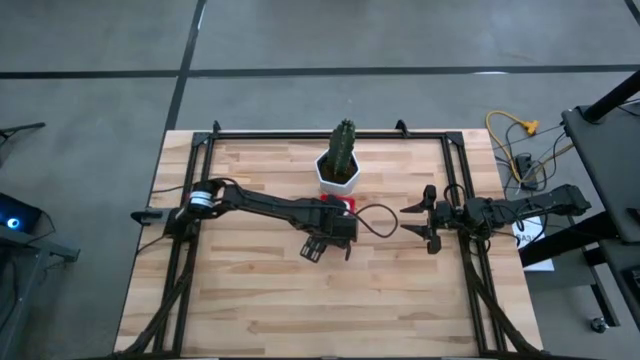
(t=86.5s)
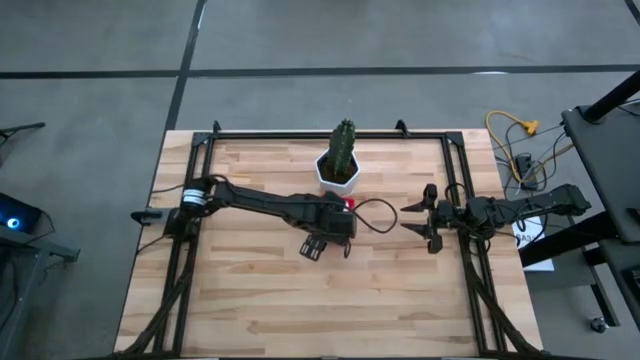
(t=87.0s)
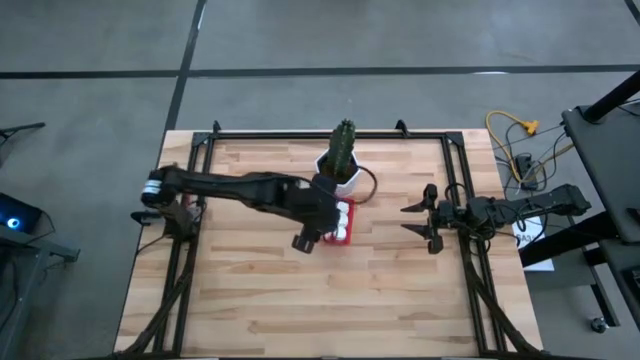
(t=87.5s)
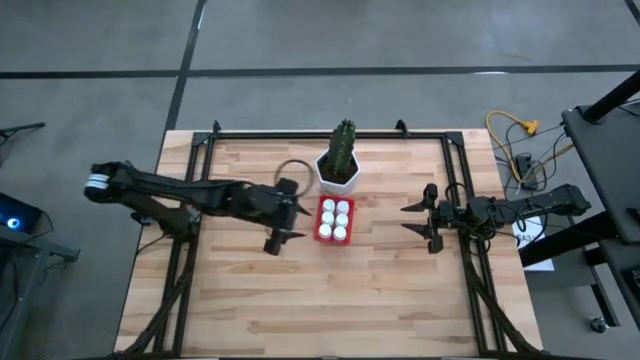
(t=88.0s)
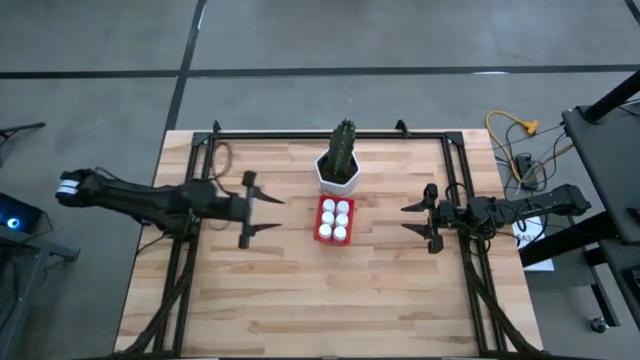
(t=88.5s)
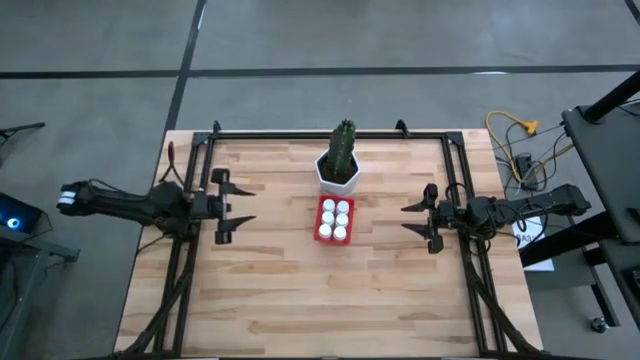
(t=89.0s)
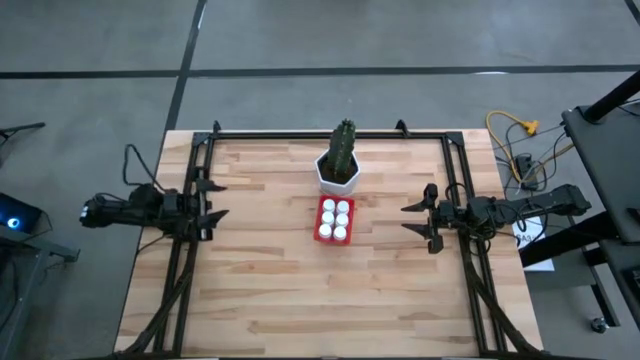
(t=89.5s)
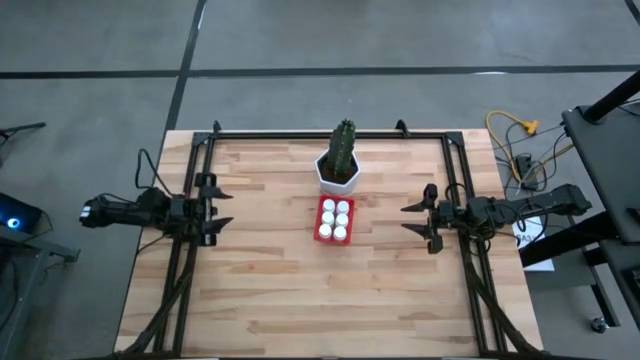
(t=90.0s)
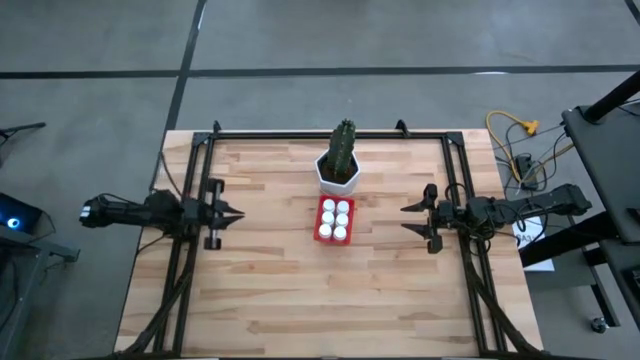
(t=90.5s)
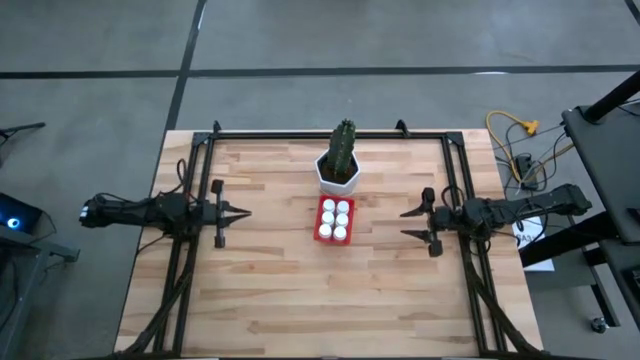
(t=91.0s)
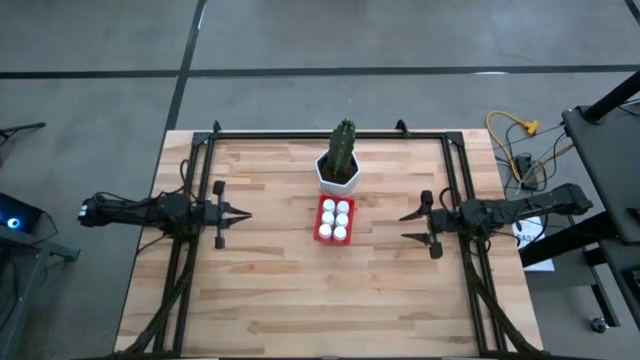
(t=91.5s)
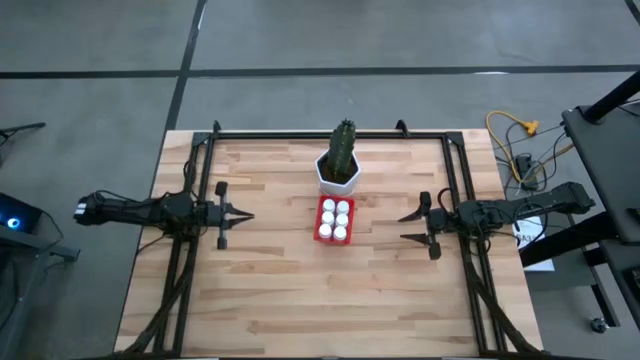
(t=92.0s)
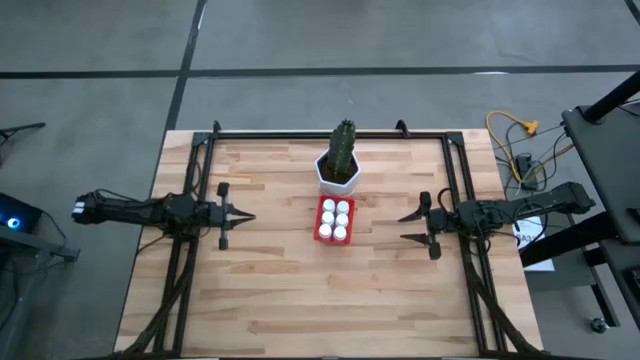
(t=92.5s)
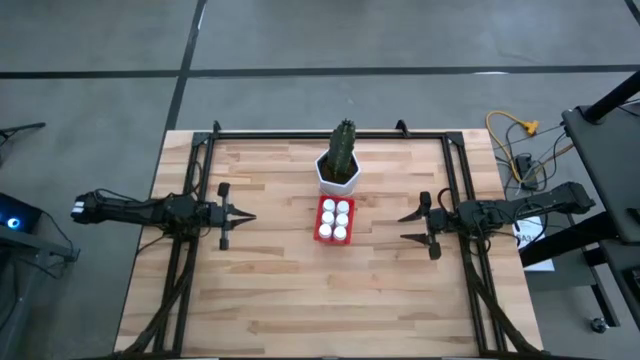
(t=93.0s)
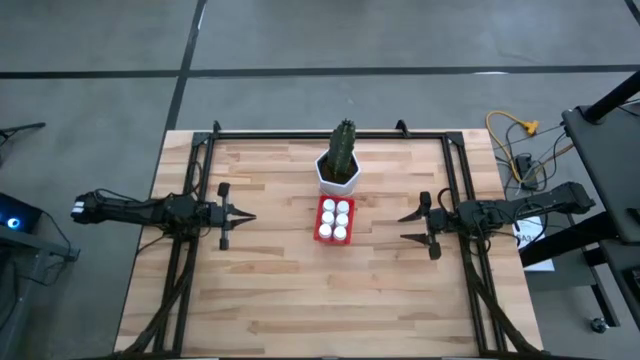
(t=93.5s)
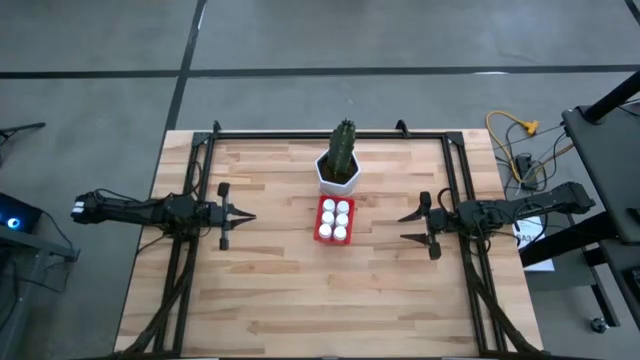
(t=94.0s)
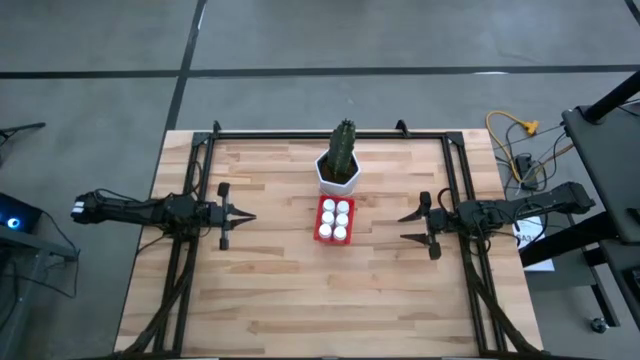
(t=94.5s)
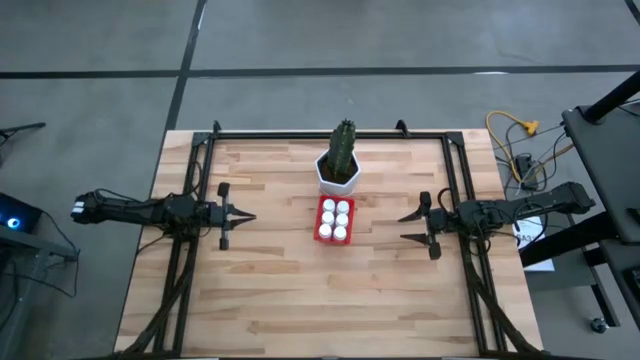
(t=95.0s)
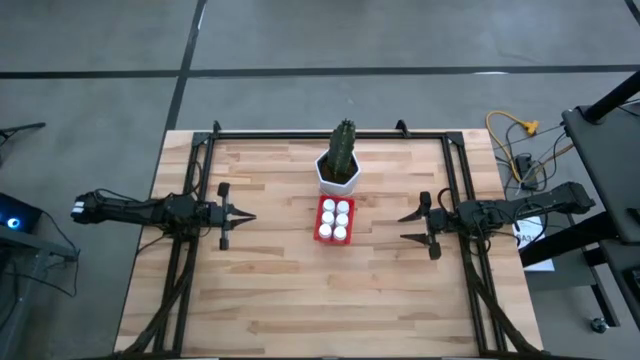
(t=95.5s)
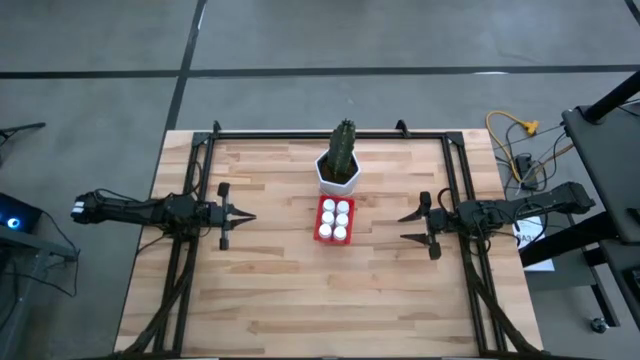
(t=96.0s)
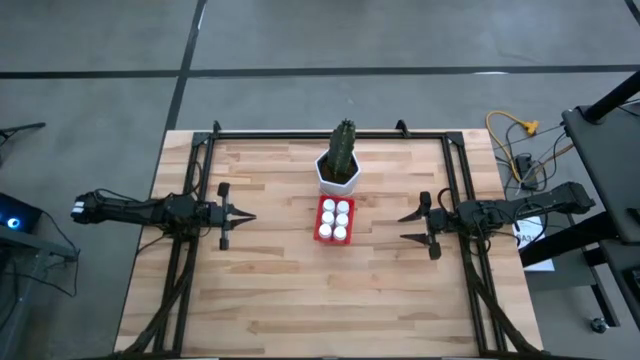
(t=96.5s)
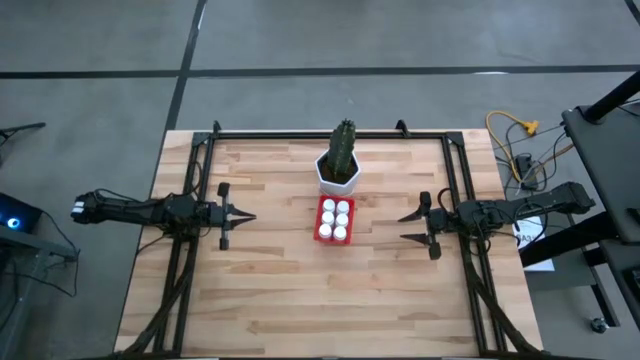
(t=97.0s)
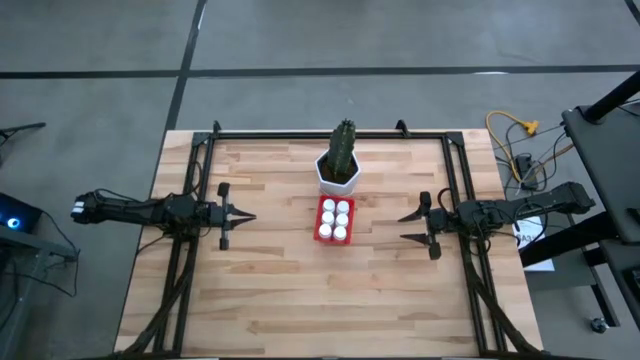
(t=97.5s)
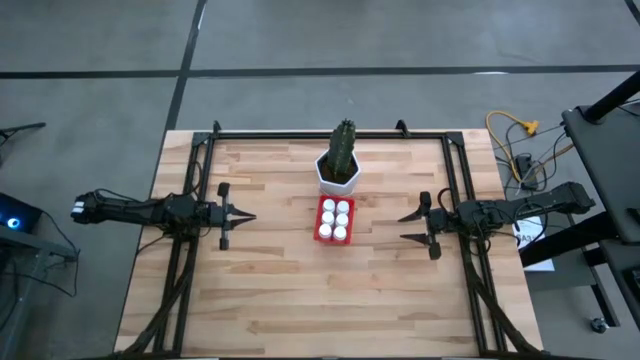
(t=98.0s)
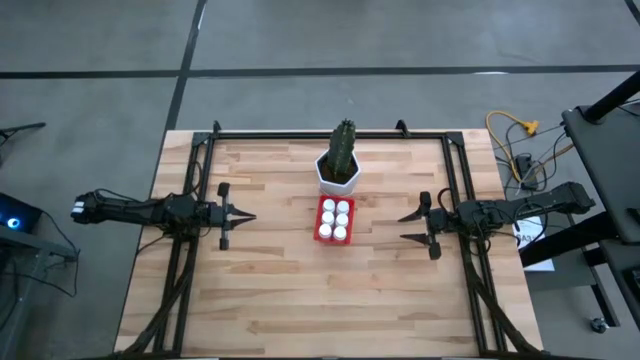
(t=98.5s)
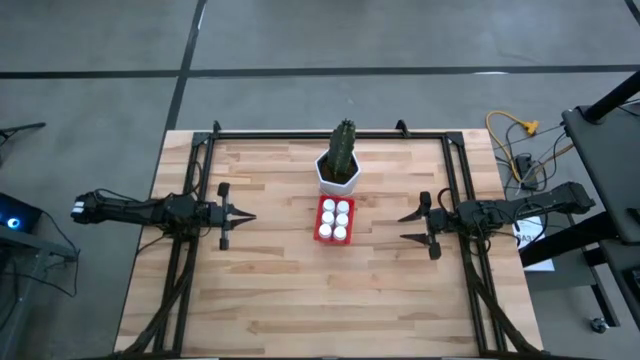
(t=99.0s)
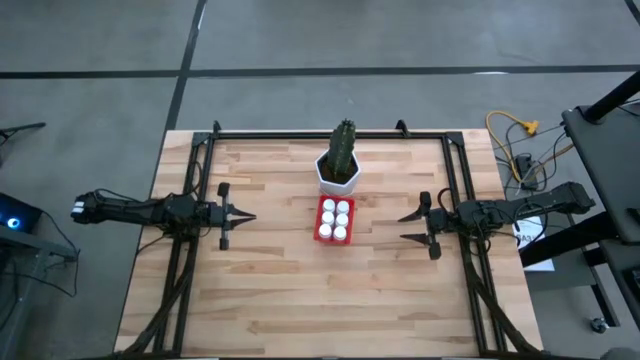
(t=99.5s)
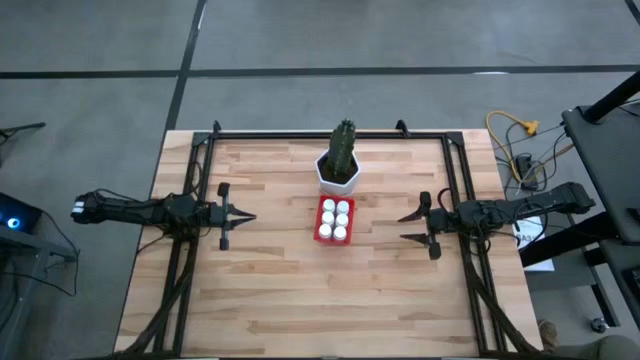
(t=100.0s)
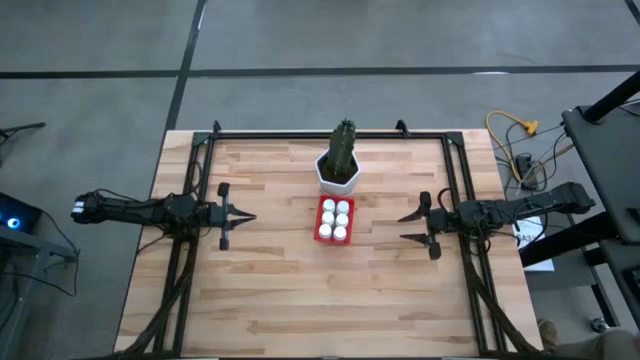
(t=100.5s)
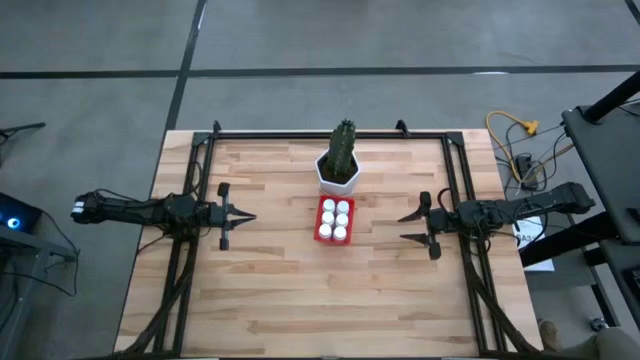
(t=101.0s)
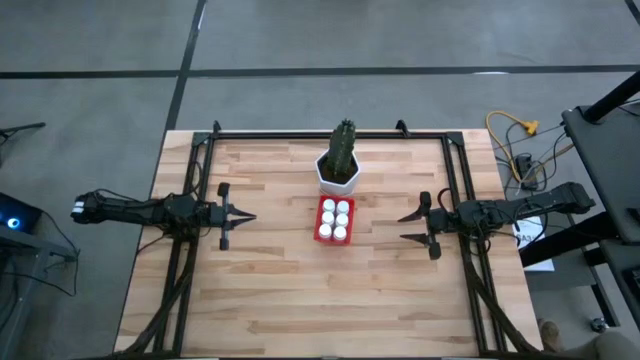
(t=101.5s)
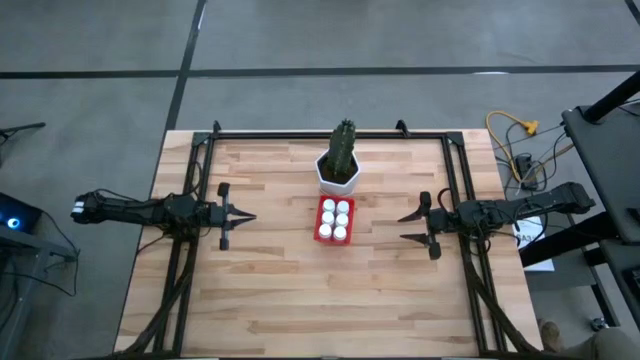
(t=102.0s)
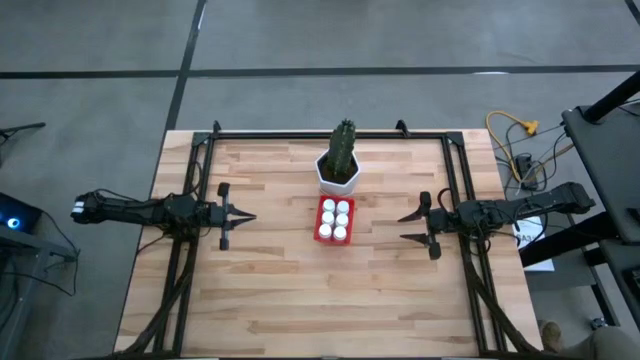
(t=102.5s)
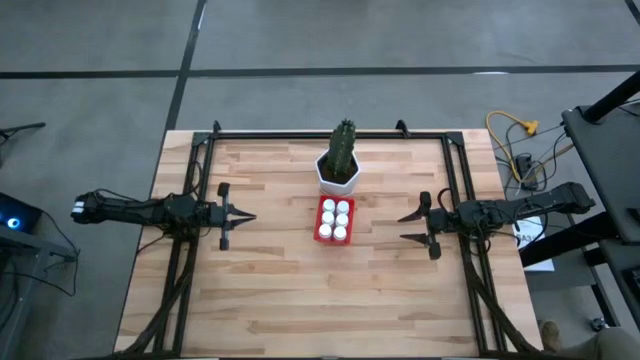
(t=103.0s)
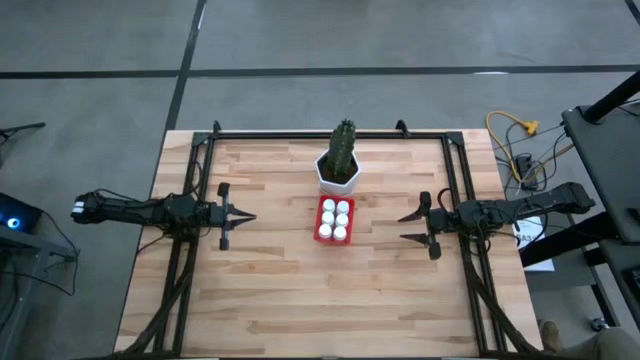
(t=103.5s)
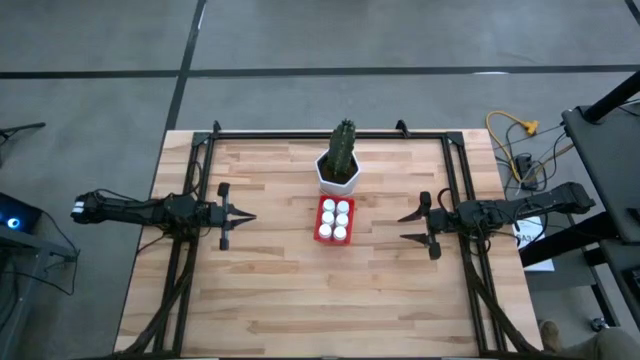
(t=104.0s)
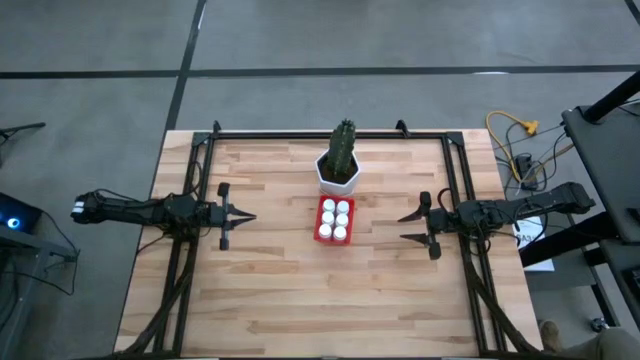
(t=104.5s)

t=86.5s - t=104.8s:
Task: Pick and place pill bottles into a basket
Return to Home Position

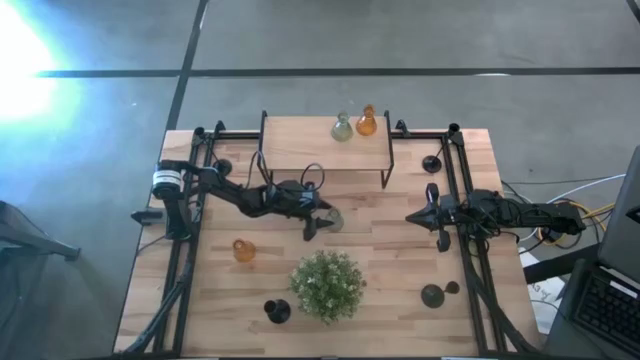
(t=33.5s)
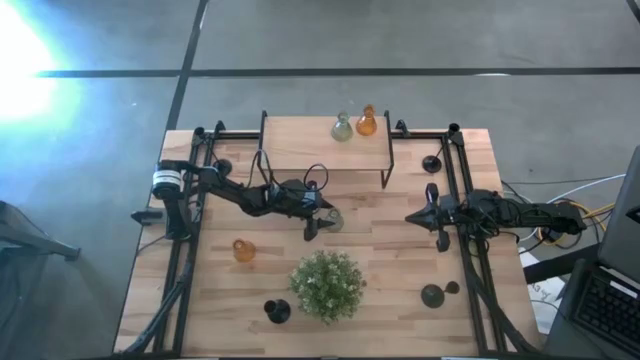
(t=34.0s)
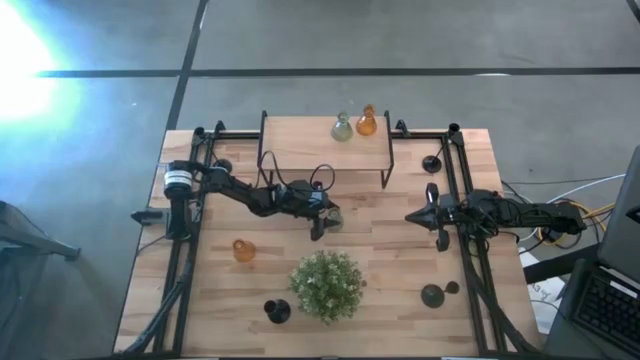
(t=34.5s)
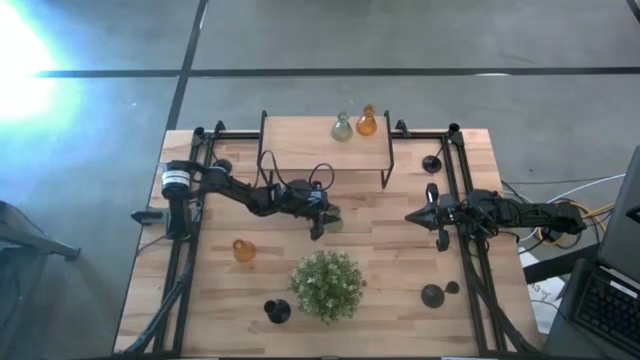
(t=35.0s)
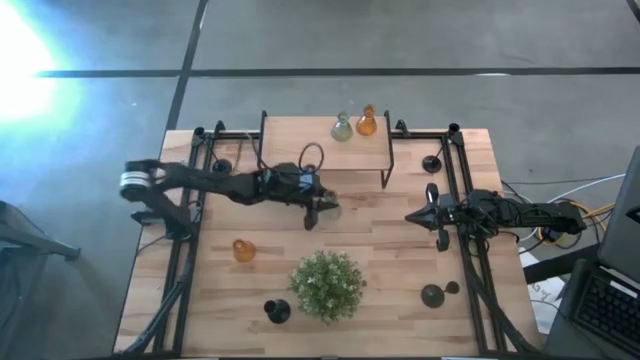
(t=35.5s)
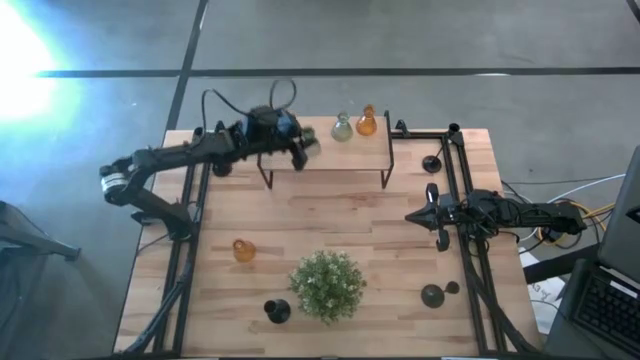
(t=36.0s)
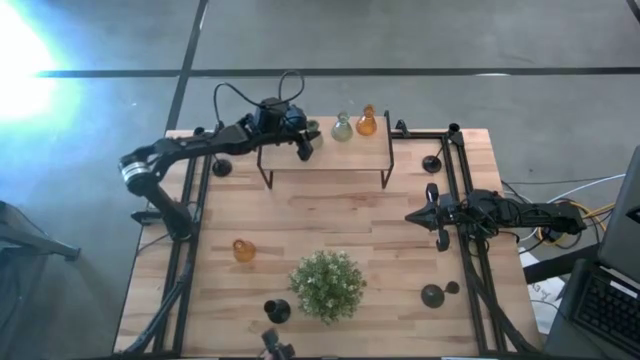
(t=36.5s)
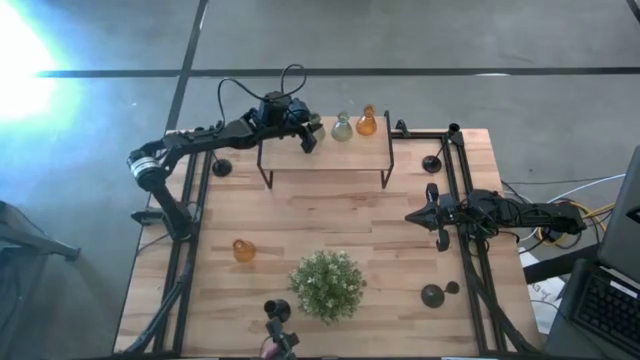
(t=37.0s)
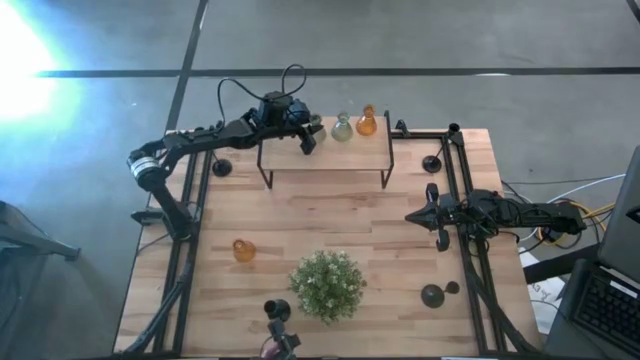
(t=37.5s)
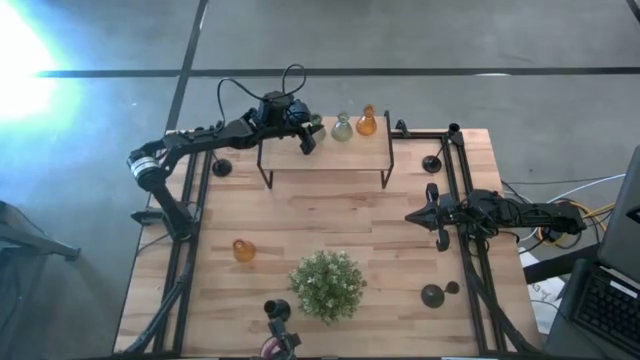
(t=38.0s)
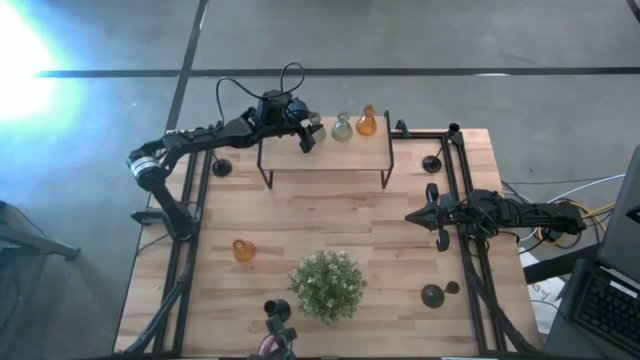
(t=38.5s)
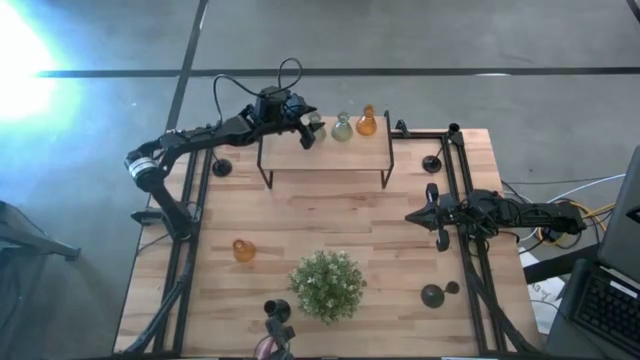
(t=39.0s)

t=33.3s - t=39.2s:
Task: Pick & Place candle stick holders
Put the green glass candle holder on the shelf aligned with the other glass candle holder
